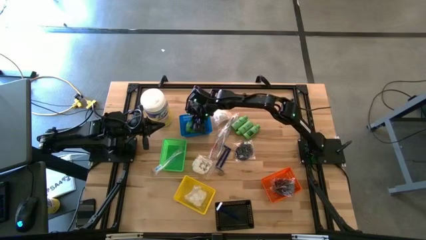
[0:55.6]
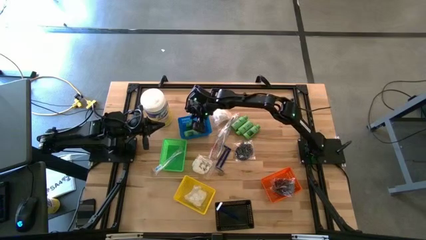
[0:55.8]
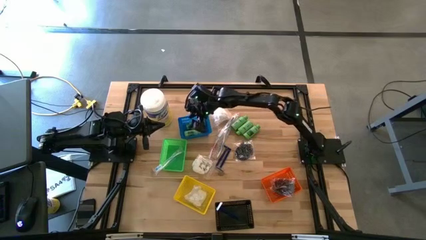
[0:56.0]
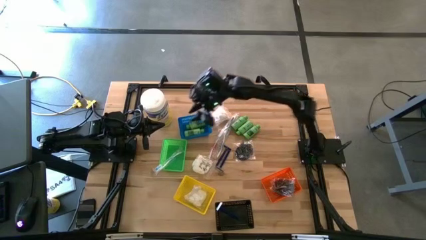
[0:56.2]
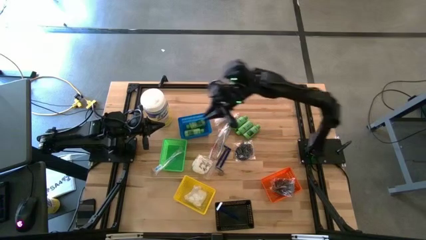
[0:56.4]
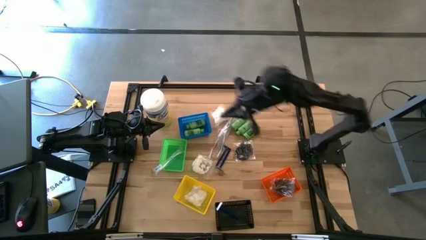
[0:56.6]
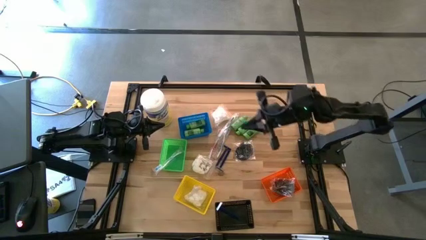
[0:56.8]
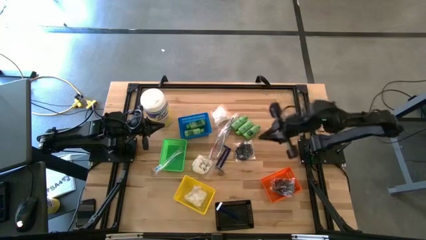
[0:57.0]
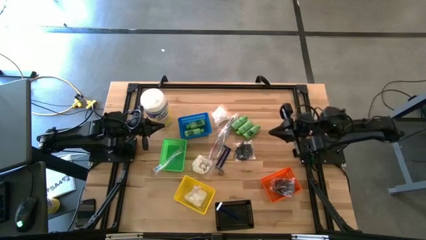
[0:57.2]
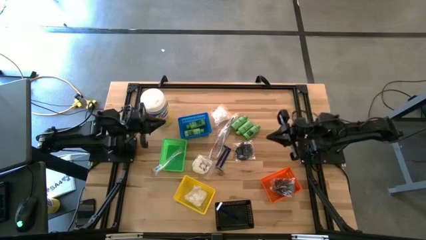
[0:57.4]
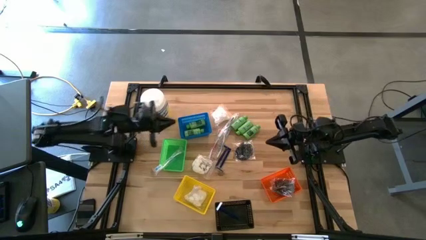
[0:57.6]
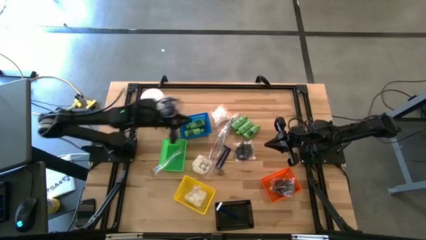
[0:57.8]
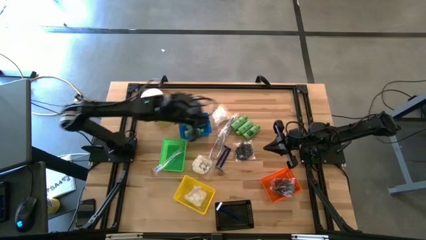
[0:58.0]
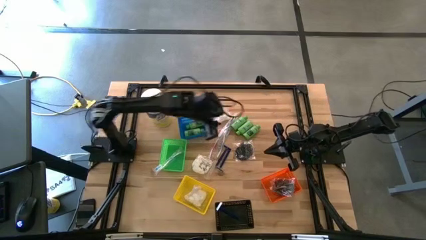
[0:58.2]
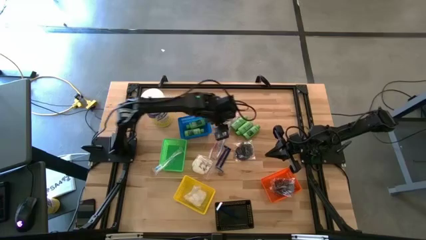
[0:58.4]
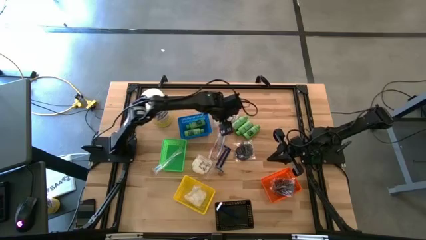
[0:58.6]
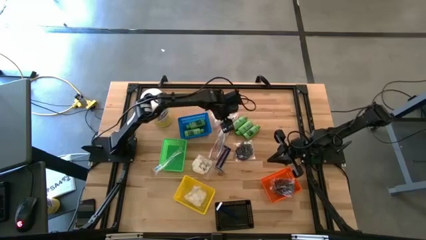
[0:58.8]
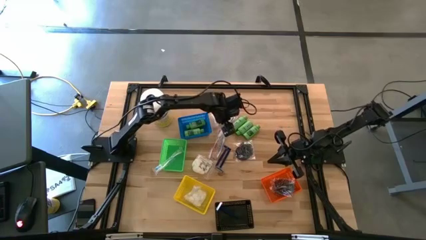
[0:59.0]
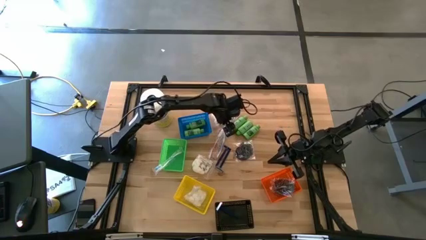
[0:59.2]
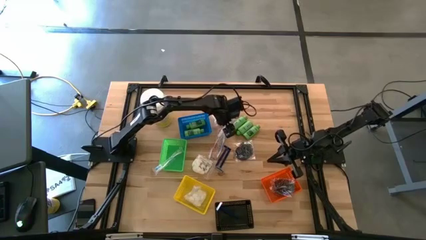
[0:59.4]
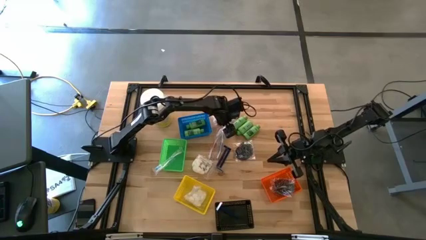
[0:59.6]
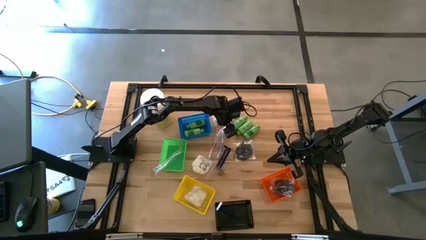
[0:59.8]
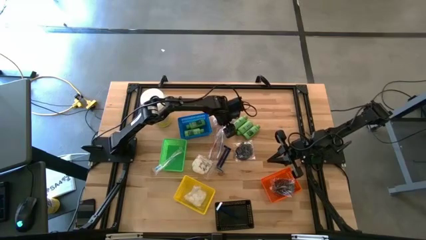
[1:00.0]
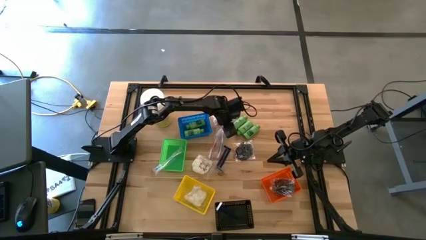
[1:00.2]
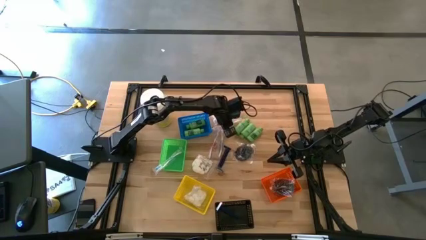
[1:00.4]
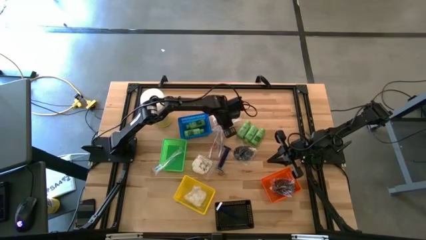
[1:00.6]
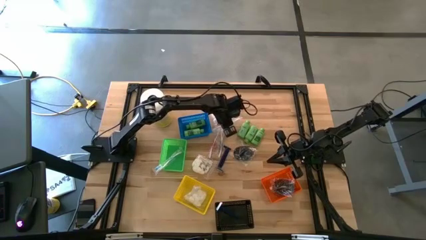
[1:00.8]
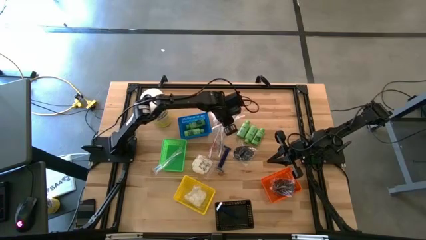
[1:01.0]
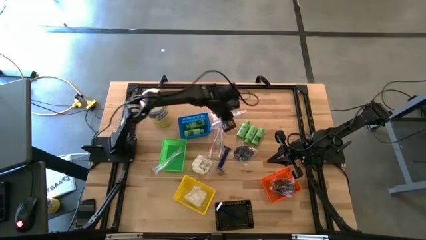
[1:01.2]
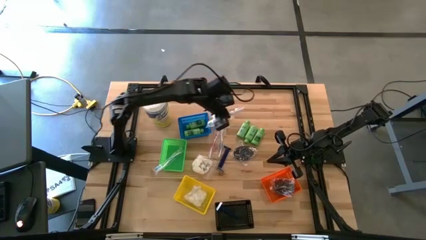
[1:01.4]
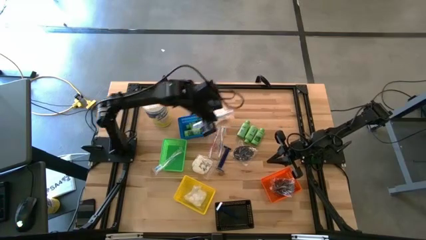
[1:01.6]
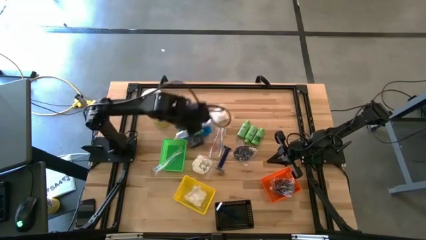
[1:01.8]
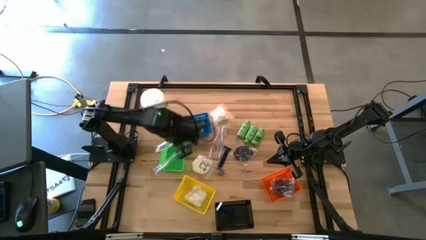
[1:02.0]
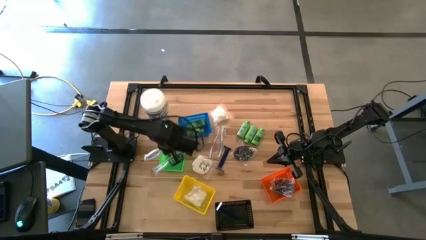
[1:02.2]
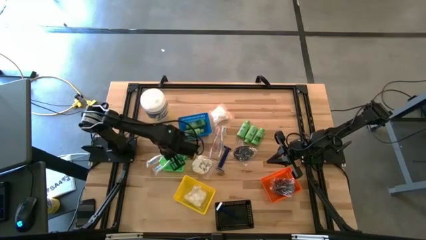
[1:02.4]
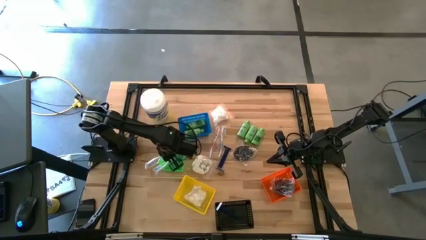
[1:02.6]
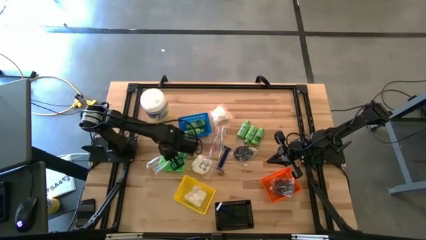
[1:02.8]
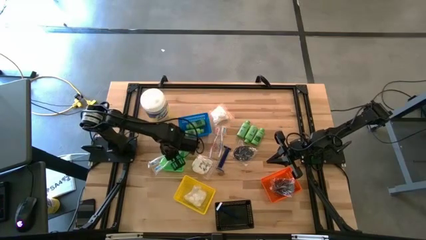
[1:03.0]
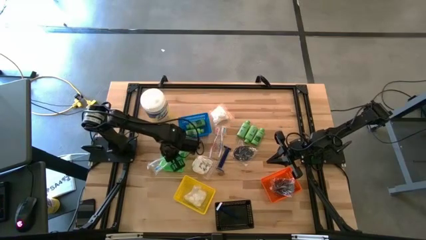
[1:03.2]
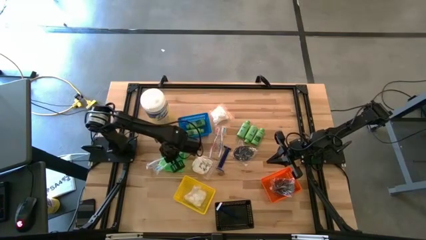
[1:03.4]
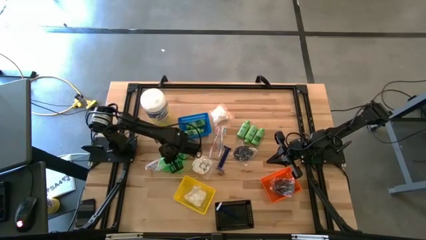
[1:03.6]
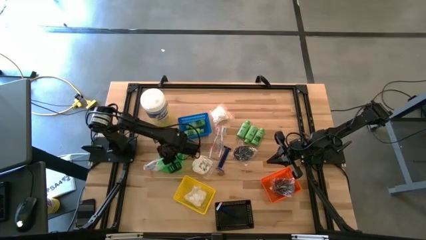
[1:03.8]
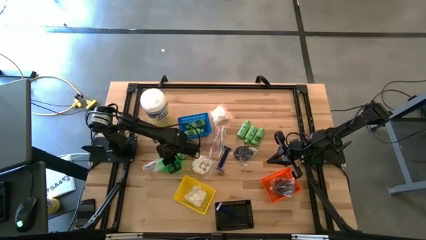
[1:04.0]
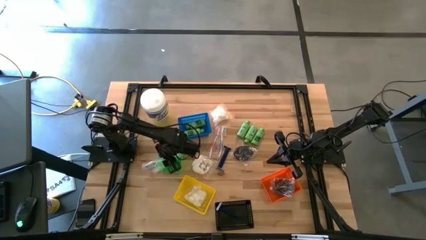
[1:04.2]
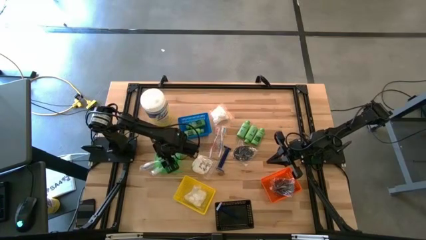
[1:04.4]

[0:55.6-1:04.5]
Task: Pick & Place Travel size toiletries
Put the blue toothbrush into the green bin

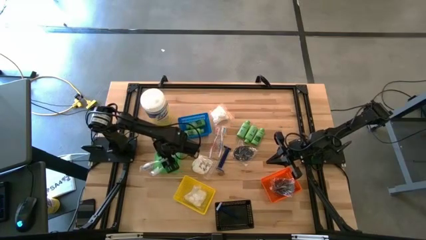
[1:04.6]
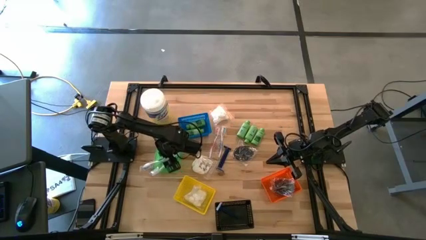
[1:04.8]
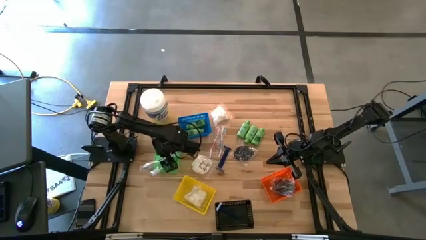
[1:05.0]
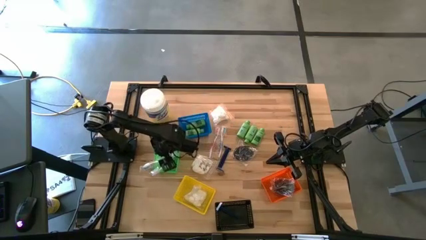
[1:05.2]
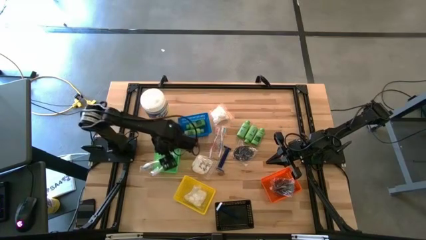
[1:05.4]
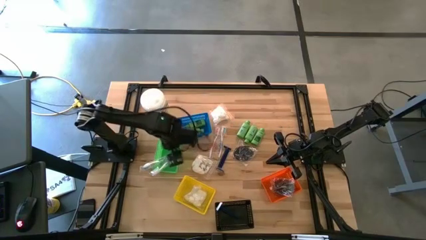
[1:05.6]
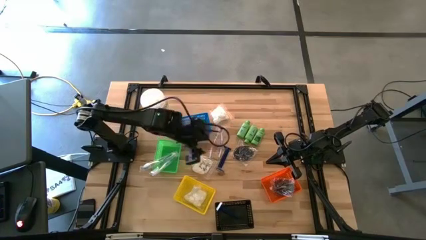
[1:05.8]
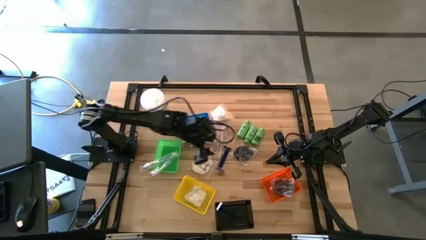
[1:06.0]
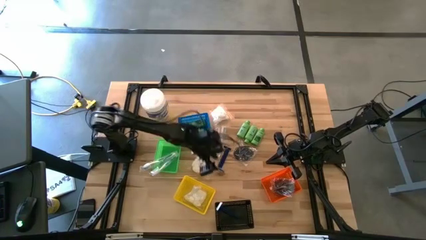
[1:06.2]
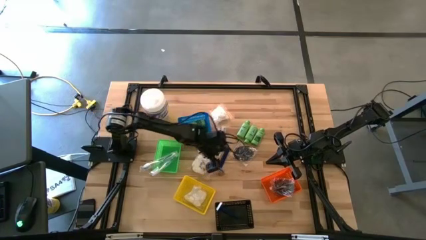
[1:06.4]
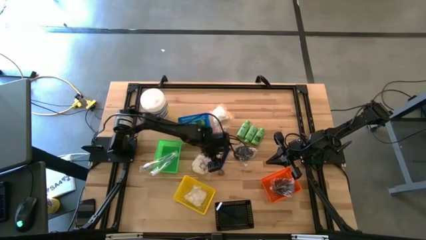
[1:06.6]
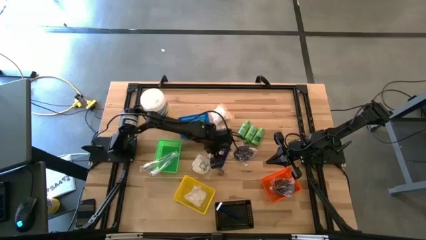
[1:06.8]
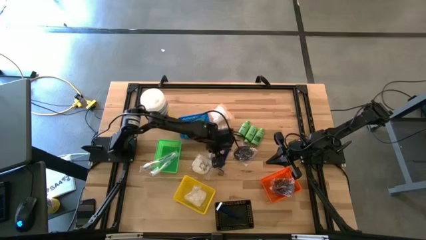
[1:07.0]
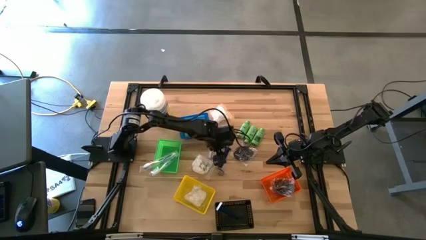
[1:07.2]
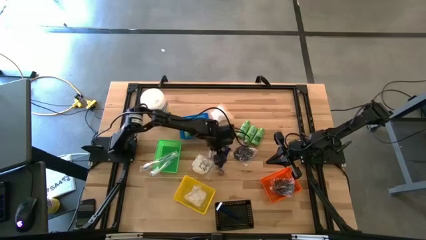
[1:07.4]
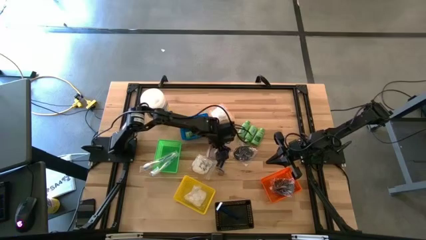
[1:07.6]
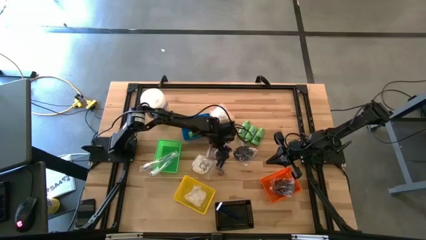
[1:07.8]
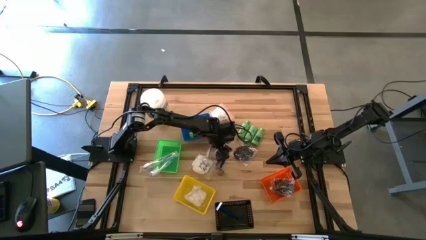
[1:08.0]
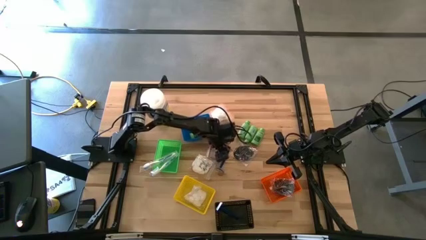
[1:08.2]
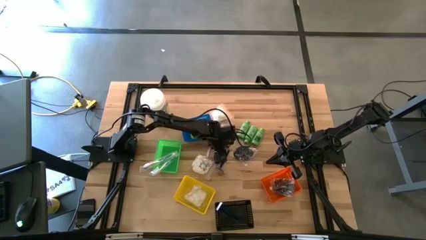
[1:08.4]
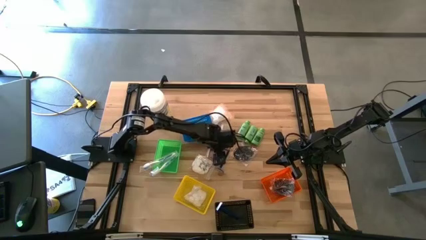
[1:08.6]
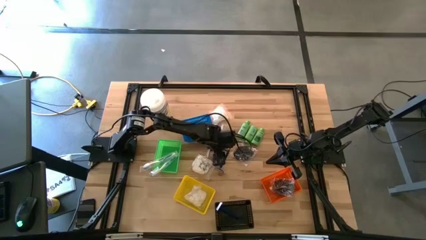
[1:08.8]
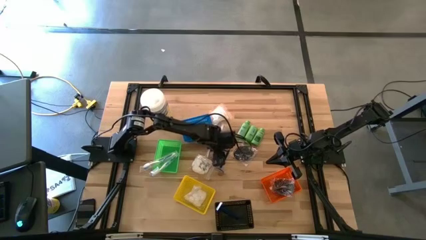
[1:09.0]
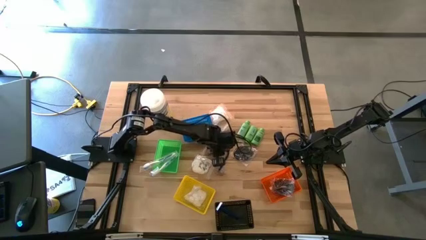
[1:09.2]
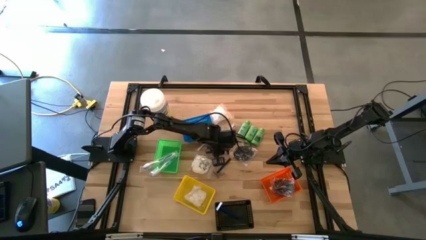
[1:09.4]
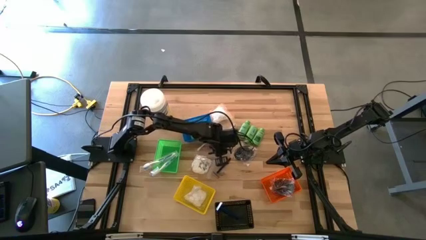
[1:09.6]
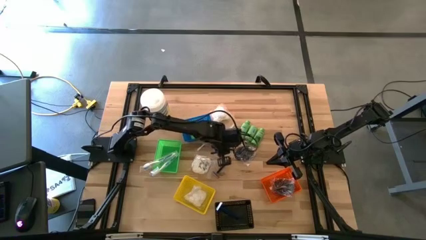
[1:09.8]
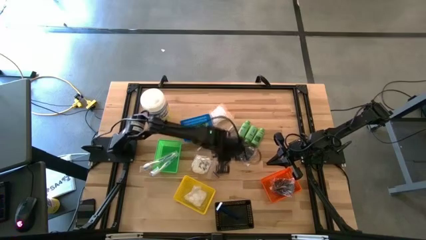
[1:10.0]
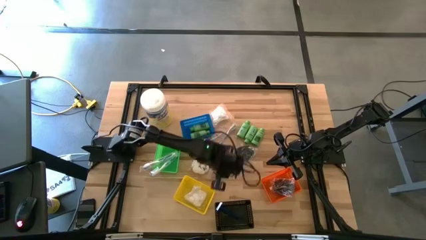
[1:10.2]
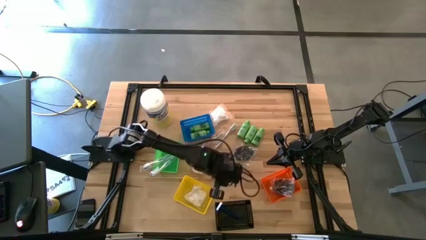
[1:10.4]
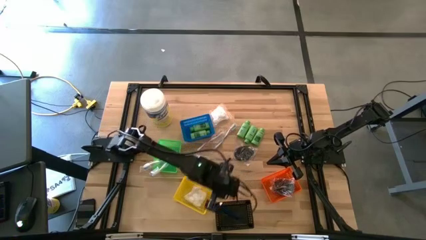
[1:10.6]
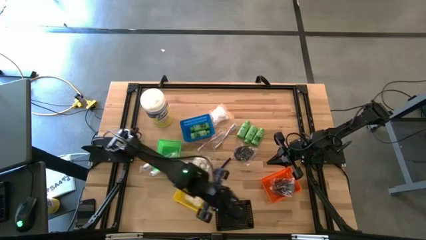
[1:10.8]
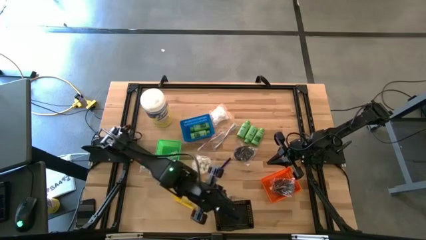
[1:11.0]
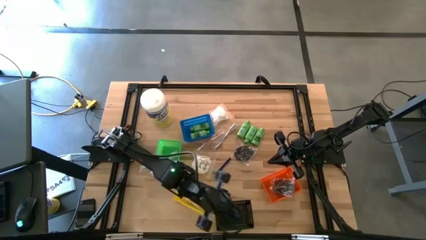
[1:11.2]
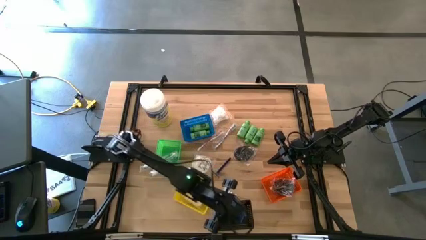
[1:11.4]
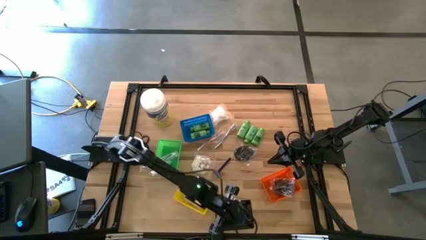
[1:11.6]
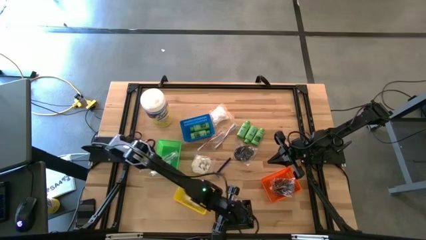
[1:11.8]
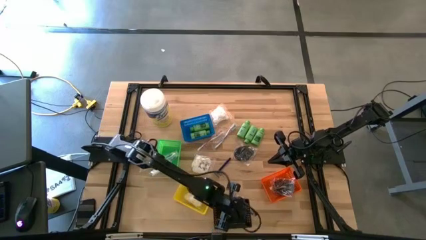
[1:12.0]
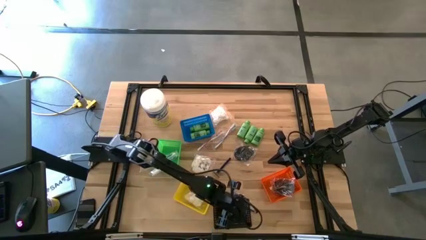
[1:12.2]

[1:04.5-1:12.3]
Put the blue razor into the black bin
